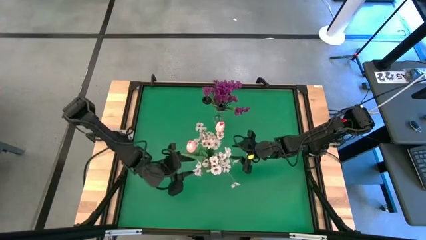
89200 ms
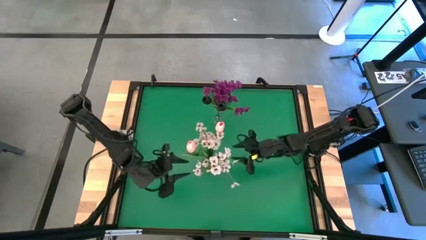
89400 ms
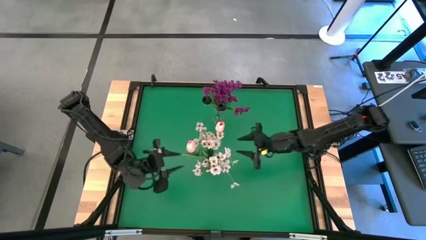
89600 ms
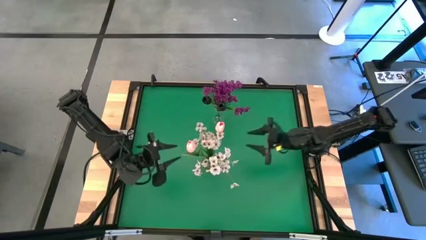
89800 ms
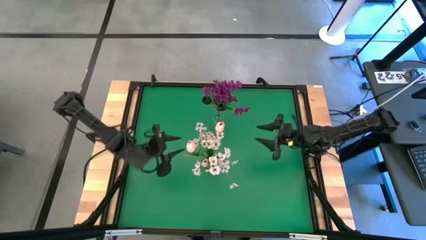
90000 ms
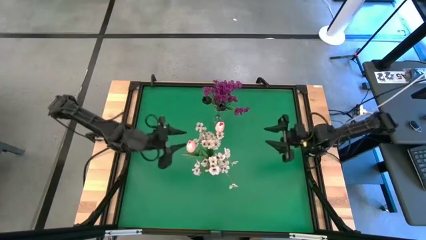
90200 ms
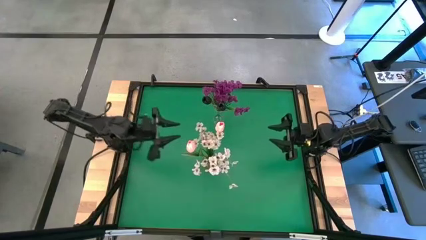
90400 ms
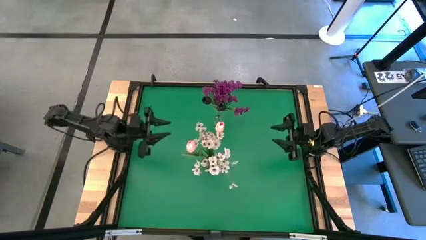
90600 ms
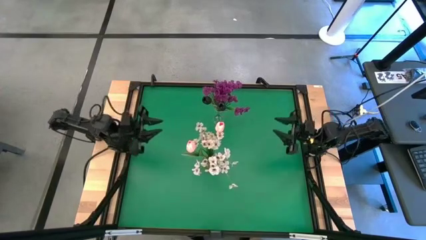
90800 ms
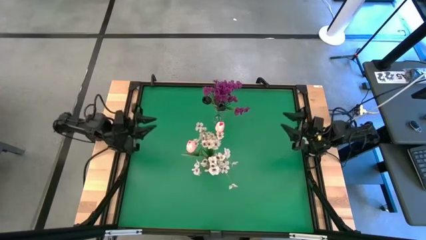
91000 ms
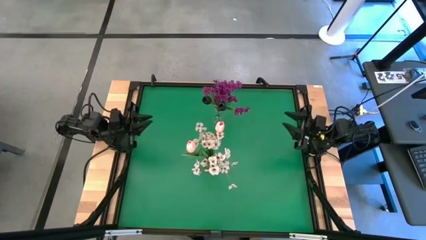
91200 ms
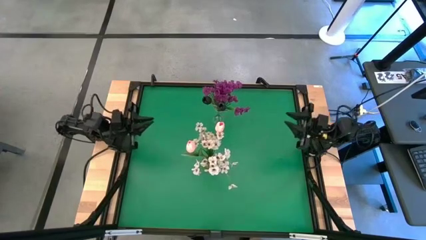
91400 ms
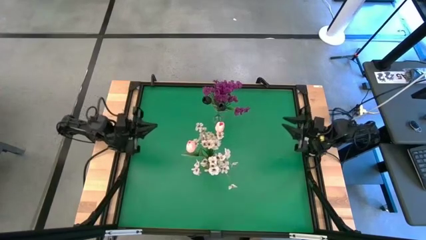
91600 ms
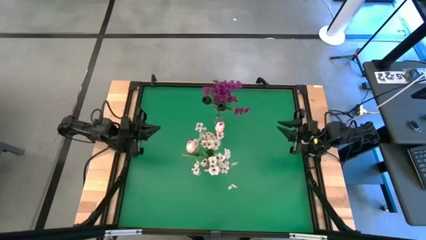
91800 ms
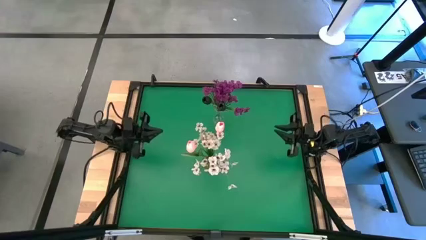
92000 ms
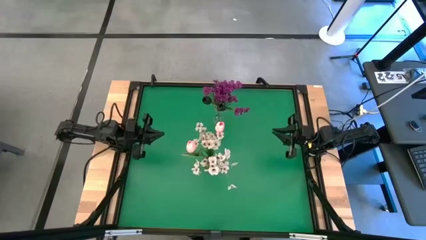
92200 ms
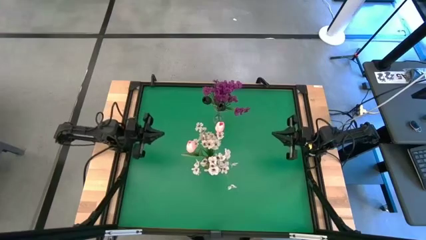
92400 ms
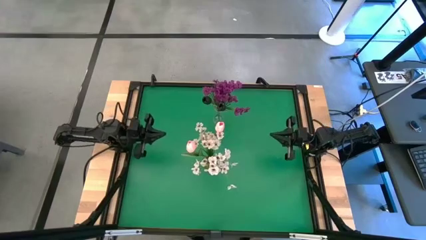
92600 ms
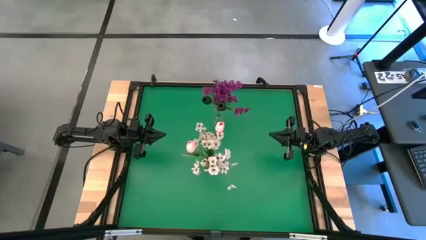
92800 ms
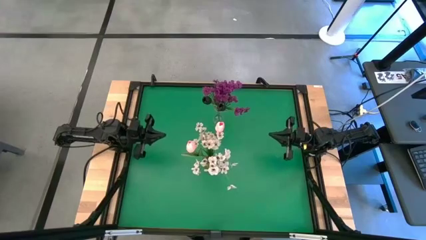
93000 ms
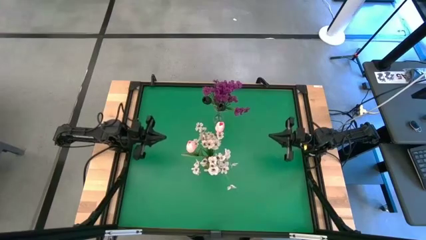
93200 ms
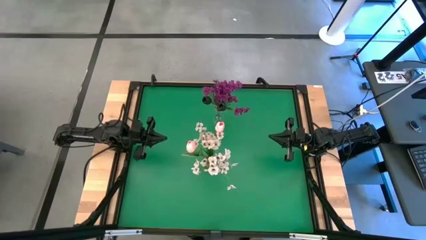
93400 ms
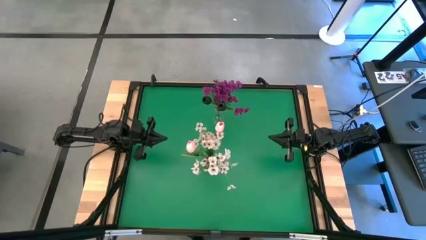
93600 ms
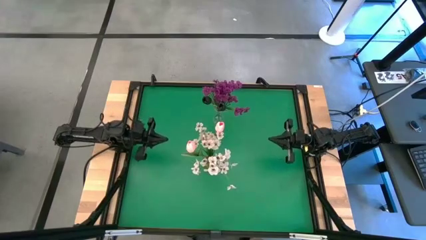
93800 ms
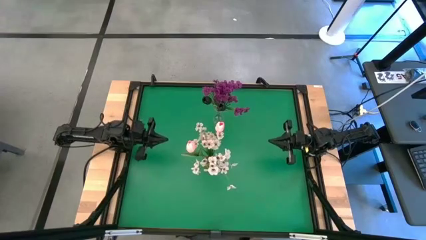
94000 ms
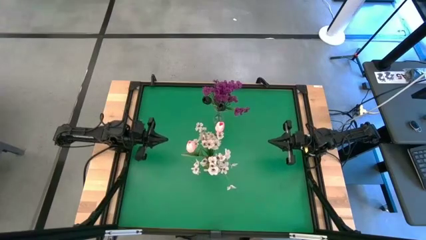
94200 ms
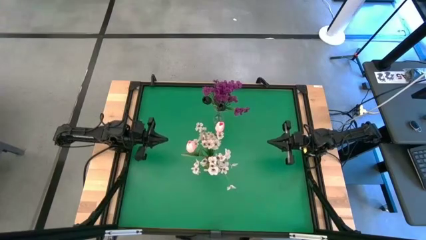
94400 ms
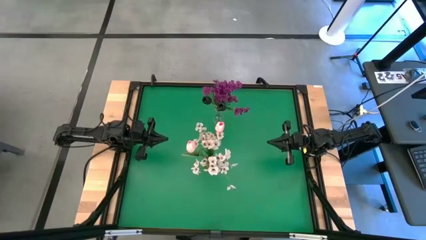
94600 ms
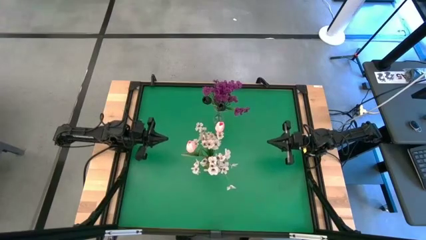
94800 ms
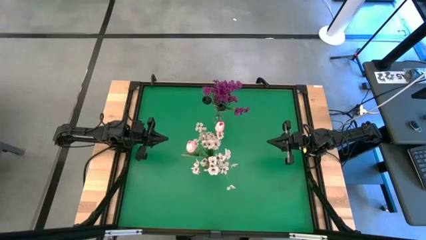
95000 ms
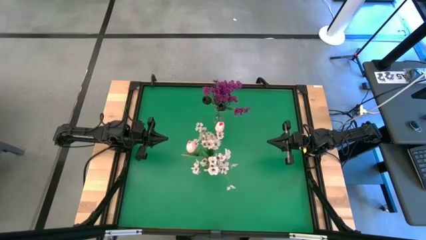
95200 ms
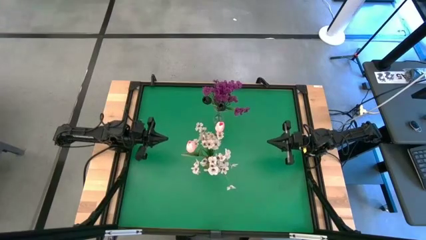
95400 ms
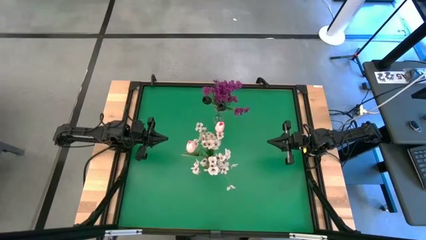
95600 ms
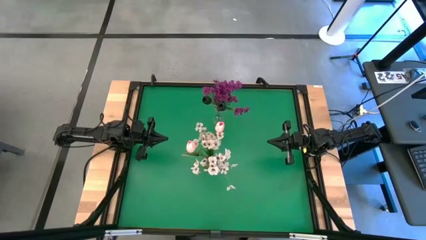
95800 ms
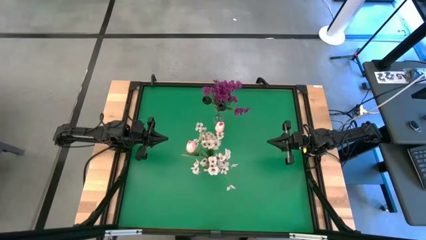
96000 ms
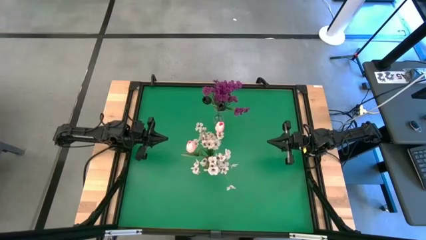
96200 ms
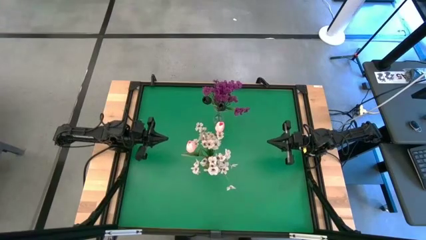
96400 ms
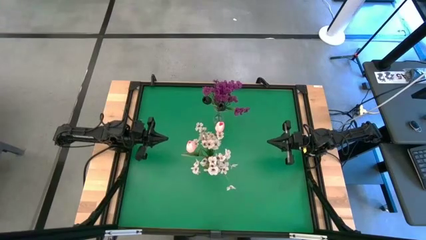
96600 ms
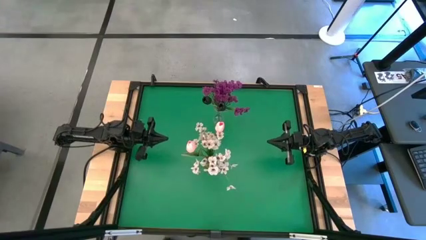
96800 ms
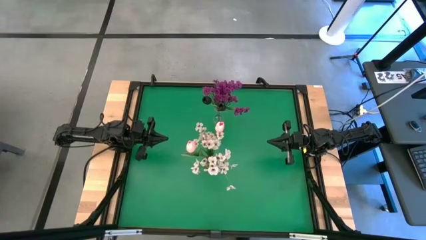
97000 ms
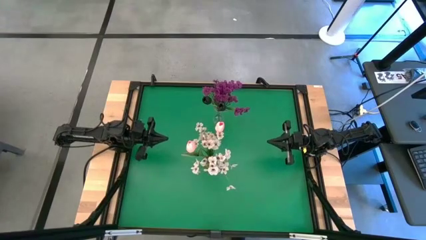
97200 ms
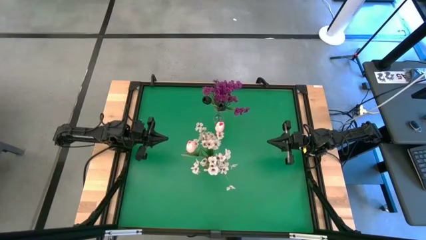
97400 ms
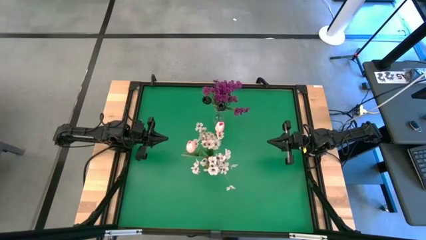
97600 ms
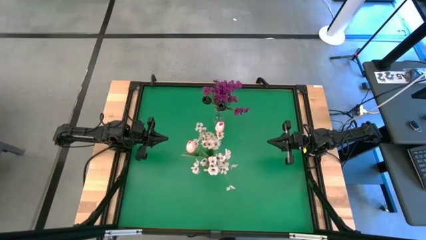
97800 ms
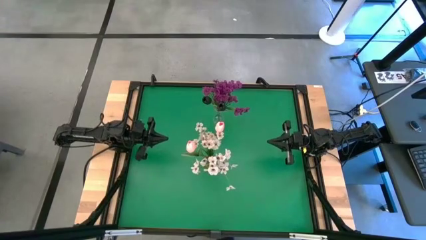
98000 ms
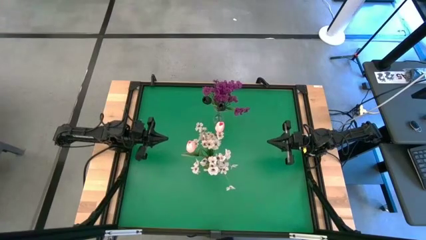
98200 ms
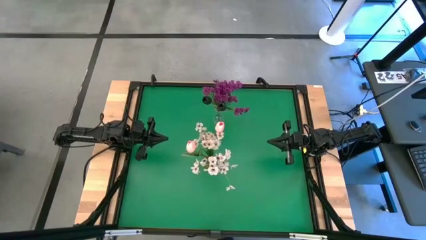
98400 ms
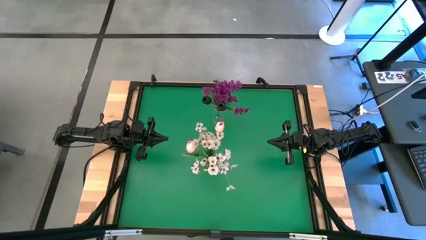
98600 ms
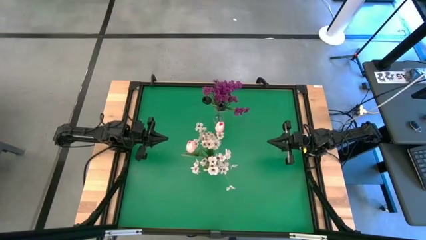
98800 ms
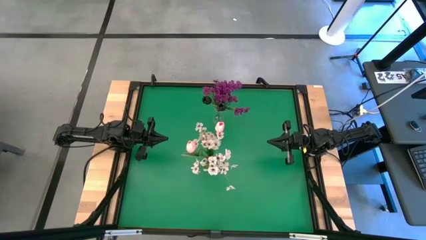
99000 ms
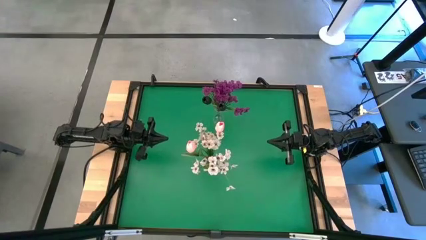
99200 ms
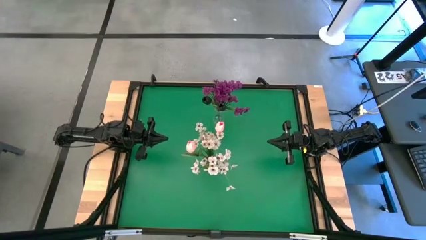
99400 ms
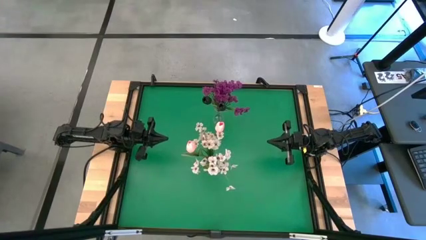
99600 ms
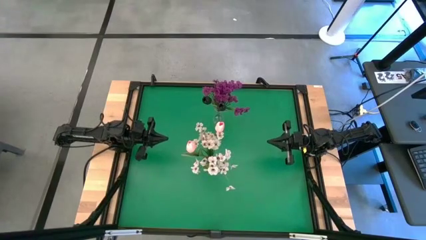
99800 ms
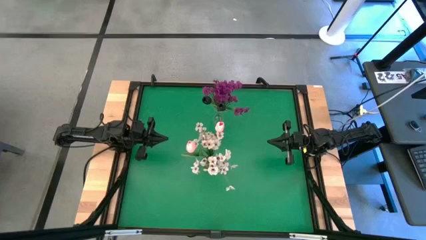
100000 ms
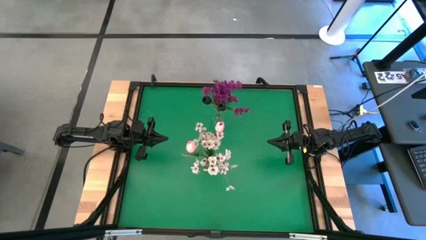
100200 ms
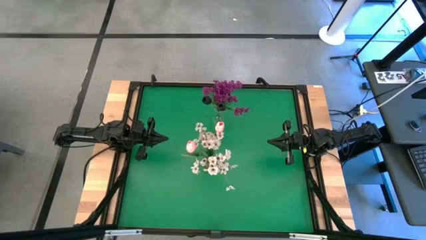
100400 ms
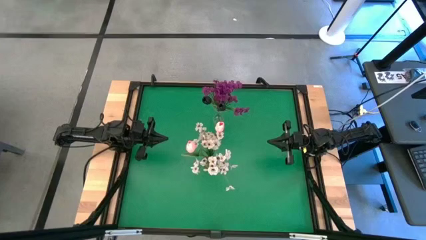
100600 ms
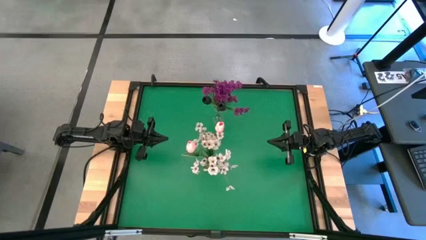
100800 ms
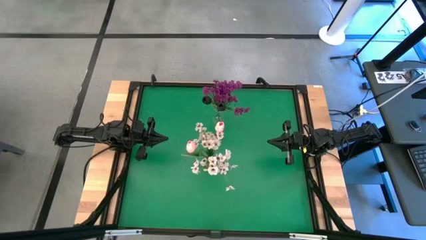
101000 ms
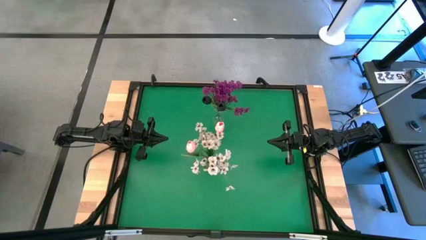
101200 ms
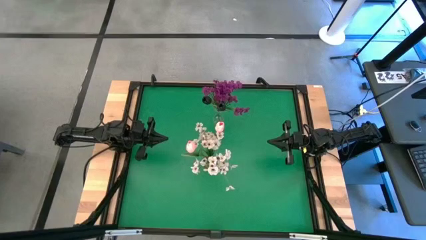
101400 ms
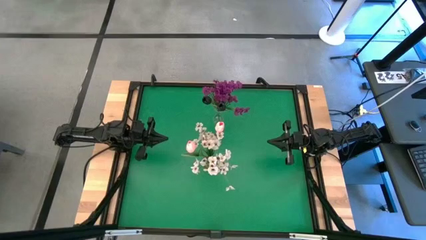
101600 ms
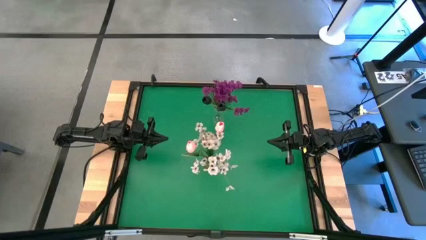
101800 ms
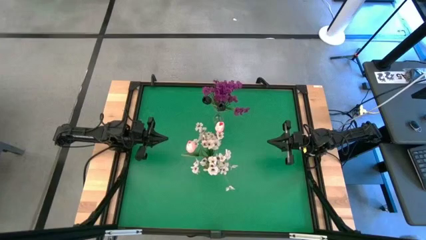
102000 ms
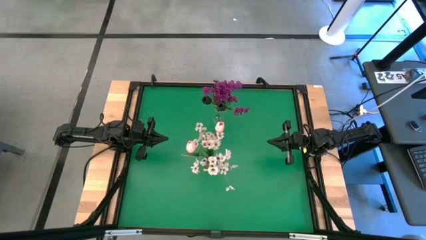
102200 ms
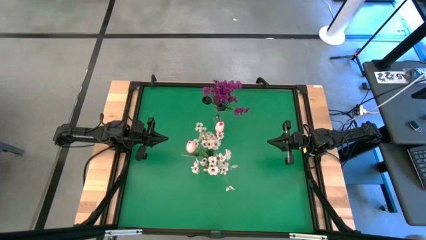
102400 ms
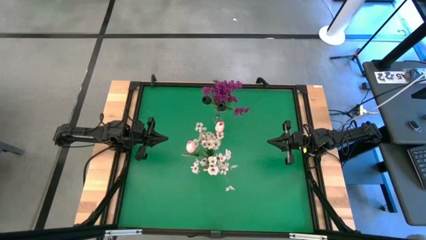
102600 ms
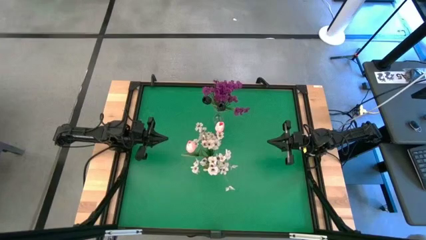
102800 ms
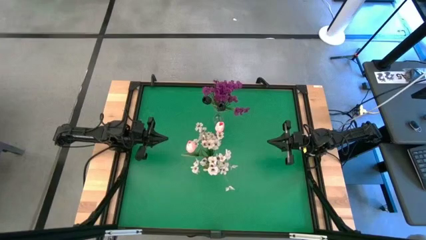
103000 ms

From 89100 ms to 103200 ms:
Task: Sort flowers into vase by color
Return to Home Position

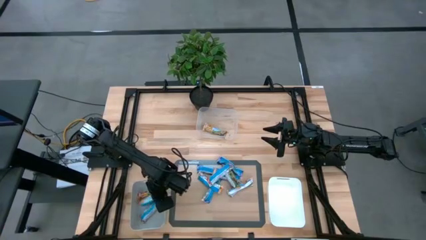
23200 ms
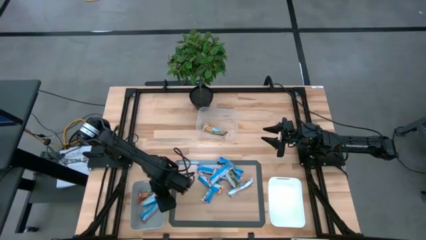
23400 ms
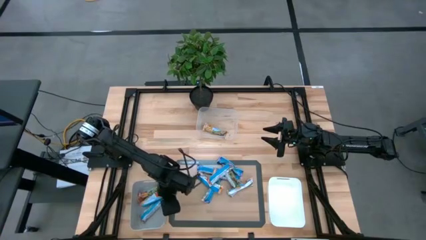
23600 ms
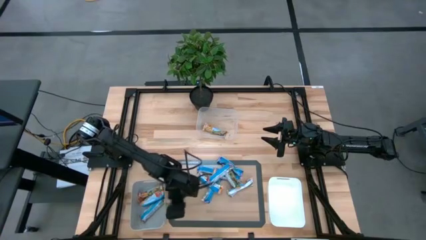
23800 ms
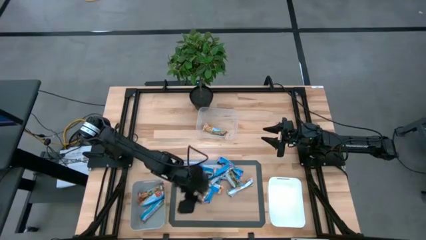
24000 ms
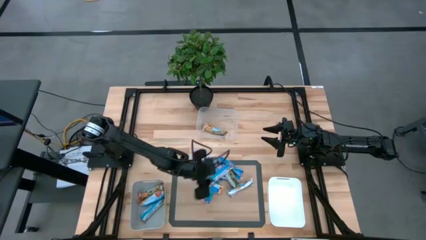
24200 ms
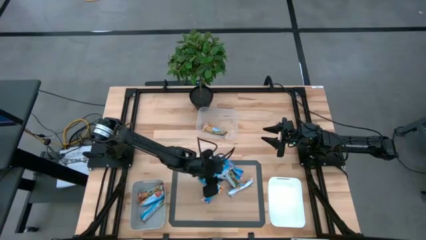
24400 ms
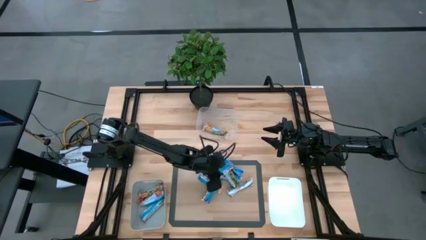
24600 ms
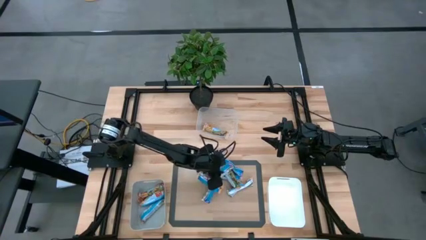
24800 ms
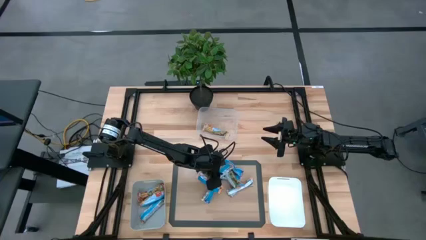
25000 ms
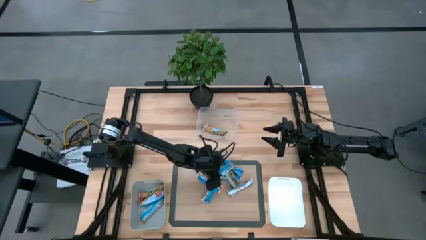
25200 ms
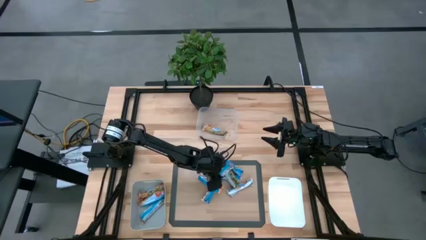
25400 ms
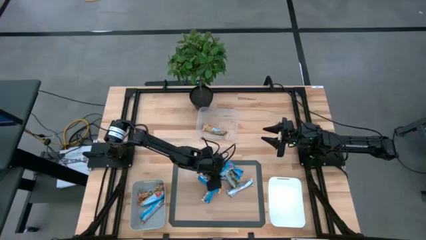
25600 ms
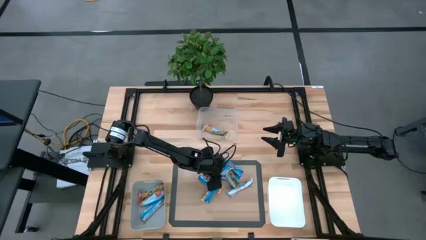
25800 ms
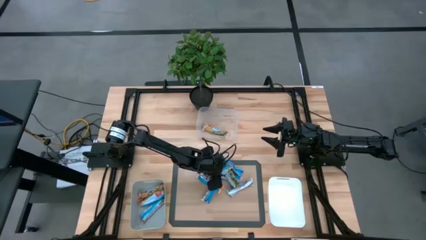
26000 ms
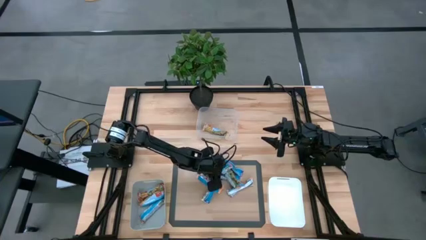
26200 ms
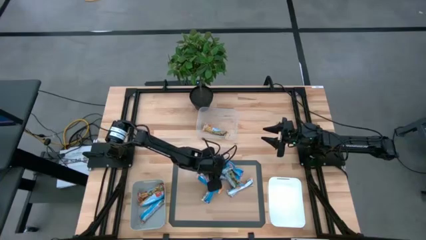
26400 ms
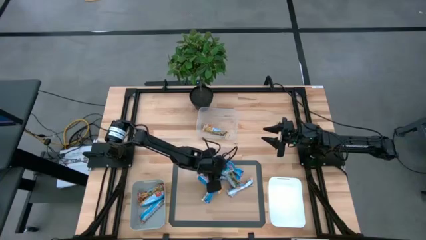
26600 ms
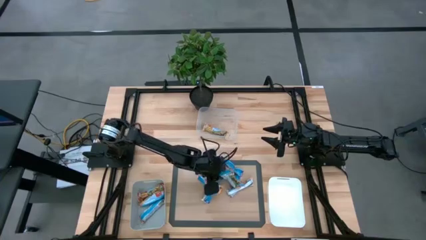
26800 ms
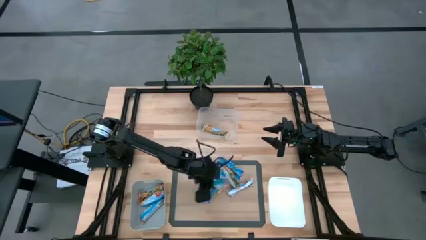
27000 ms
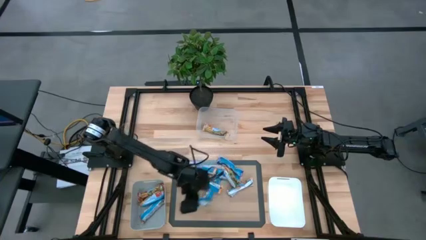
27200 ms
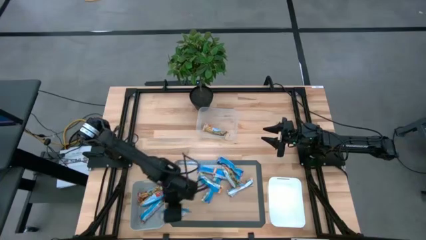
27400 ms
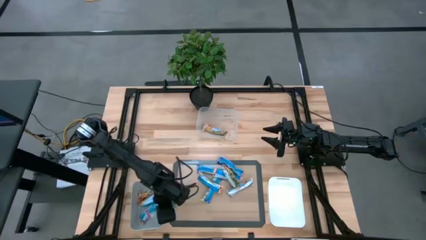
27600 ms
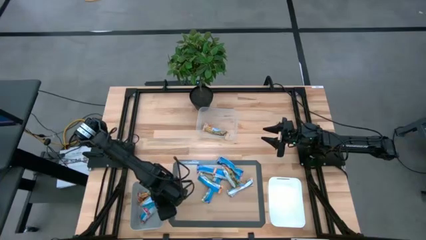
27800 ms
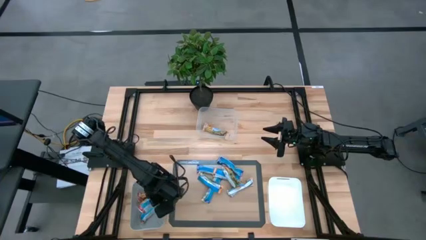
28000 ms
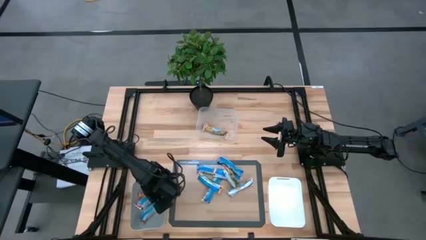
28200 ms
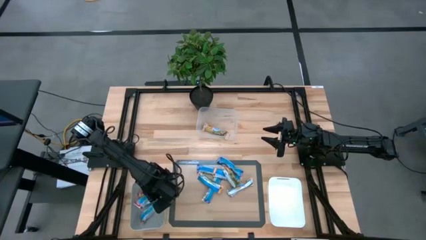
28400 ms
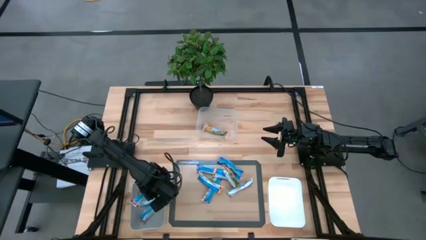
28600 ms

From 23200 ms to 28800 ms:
Task: Pick and place Granola Bars by type
Put the red granola bar into the gray bin
